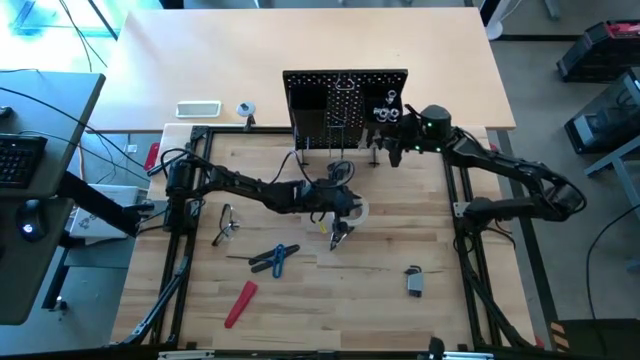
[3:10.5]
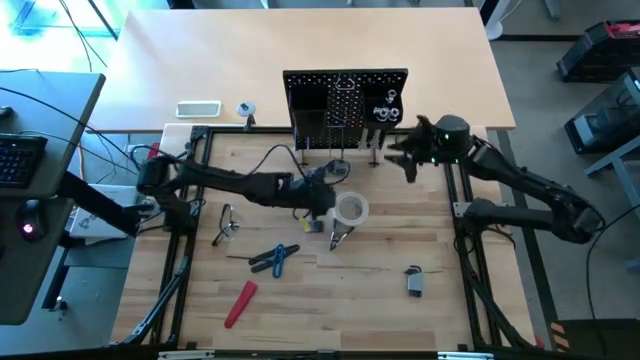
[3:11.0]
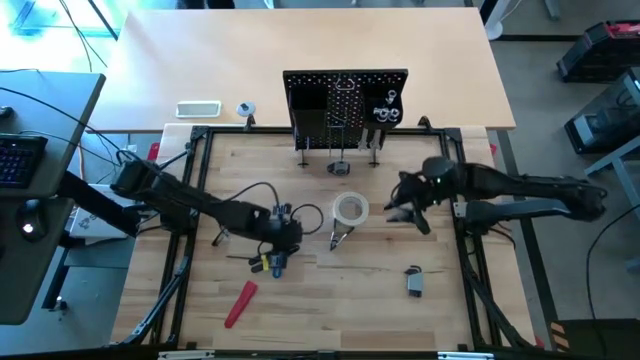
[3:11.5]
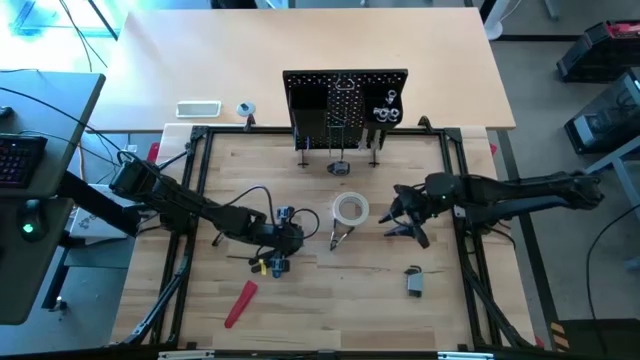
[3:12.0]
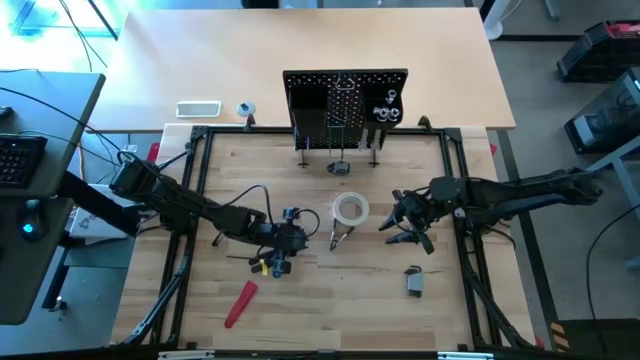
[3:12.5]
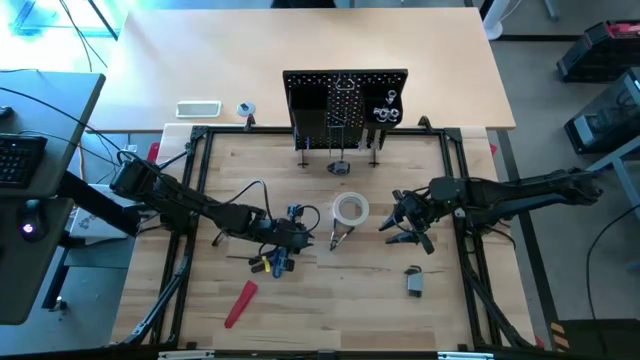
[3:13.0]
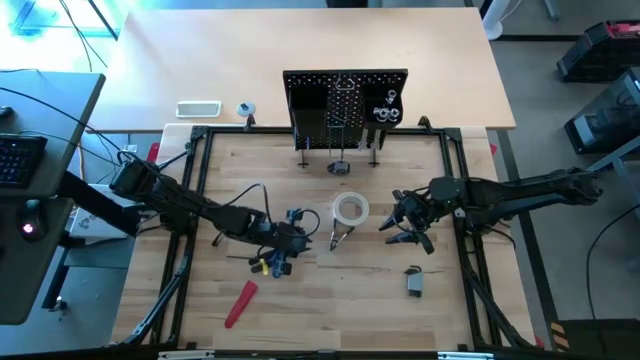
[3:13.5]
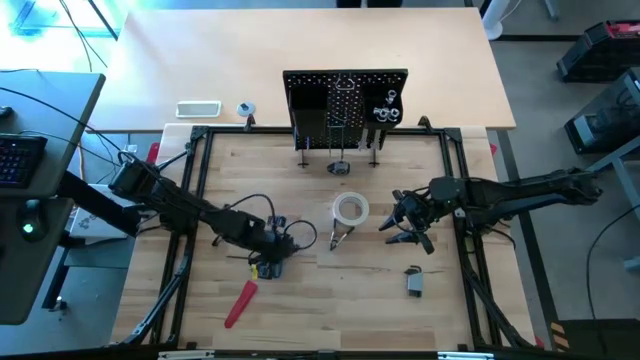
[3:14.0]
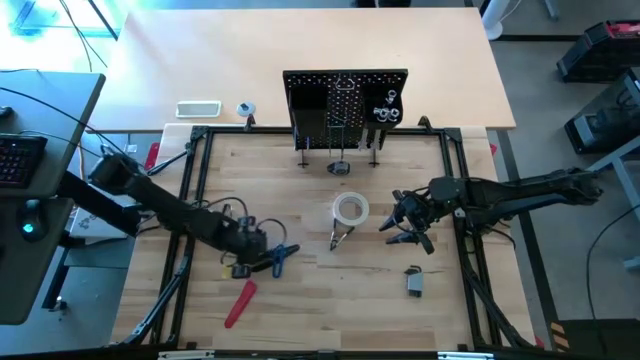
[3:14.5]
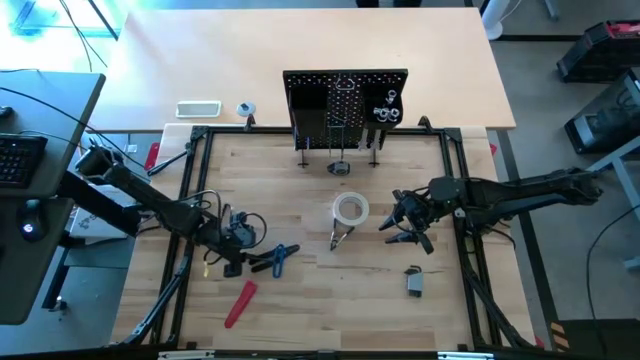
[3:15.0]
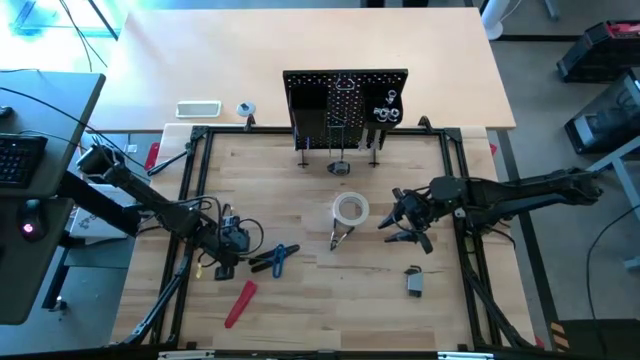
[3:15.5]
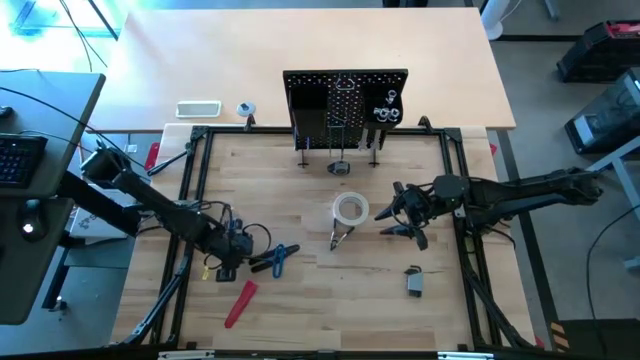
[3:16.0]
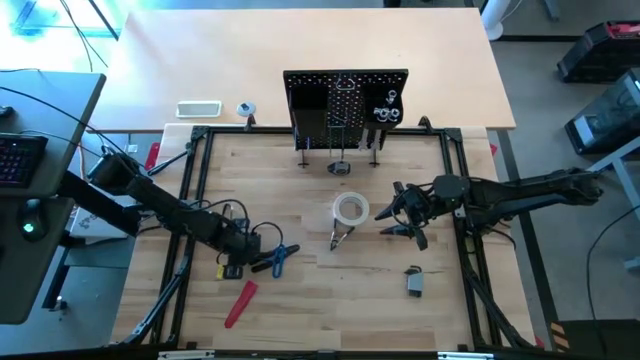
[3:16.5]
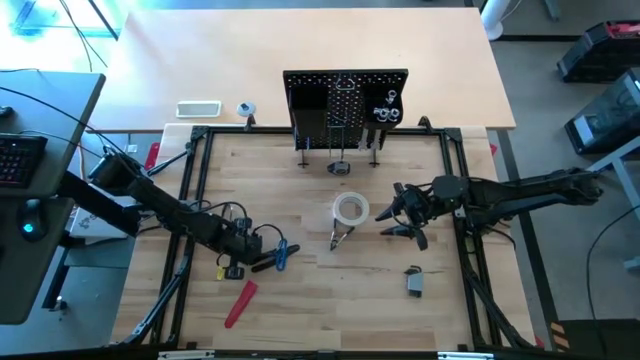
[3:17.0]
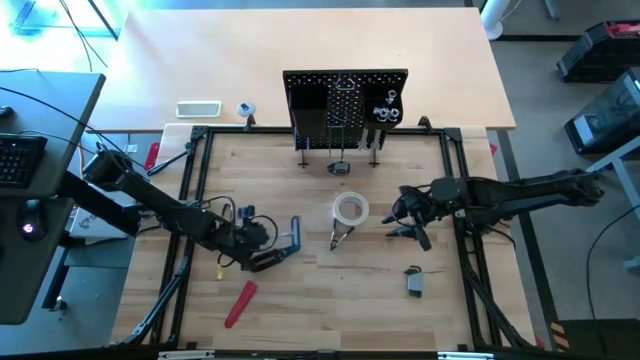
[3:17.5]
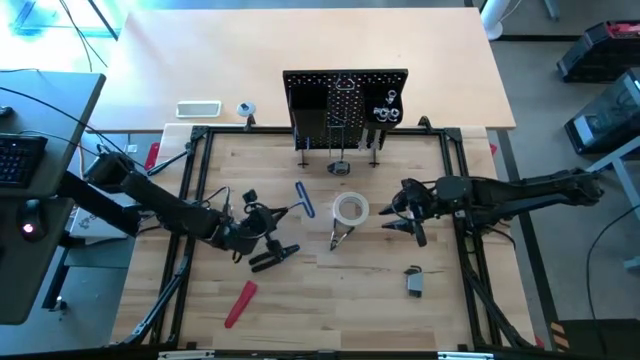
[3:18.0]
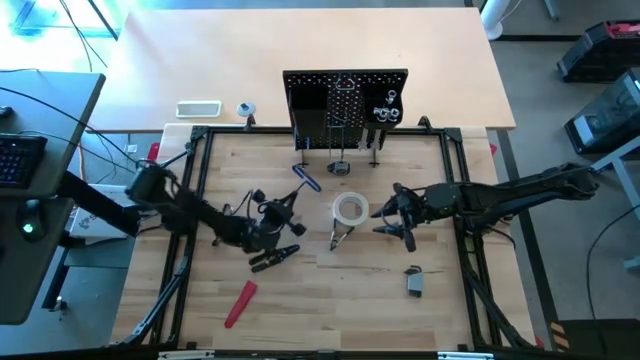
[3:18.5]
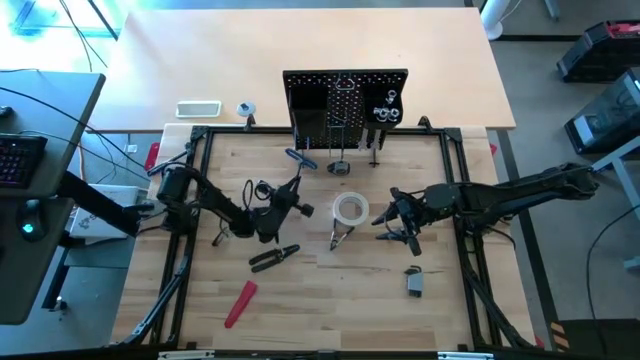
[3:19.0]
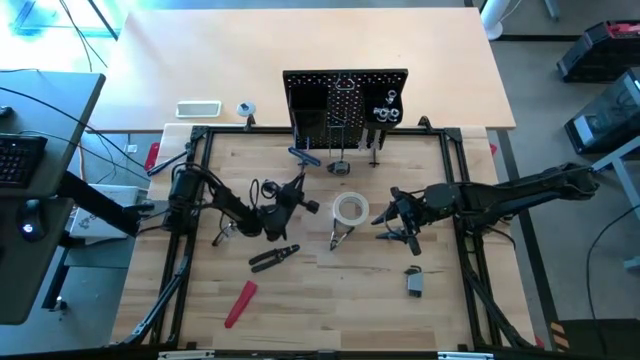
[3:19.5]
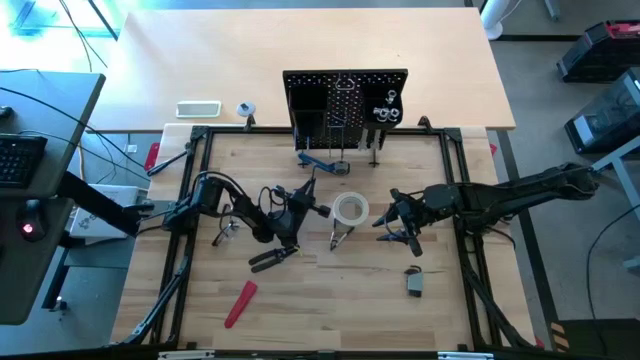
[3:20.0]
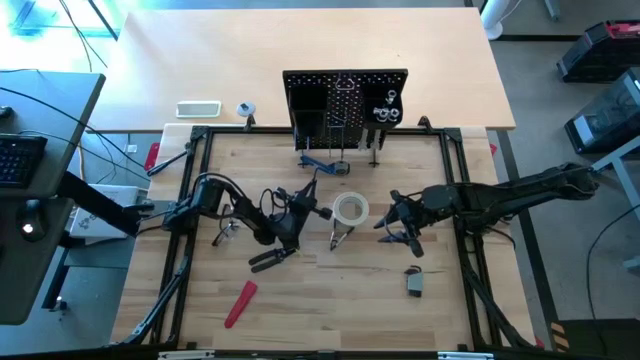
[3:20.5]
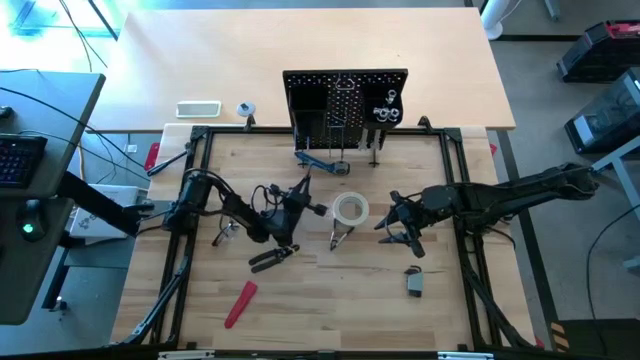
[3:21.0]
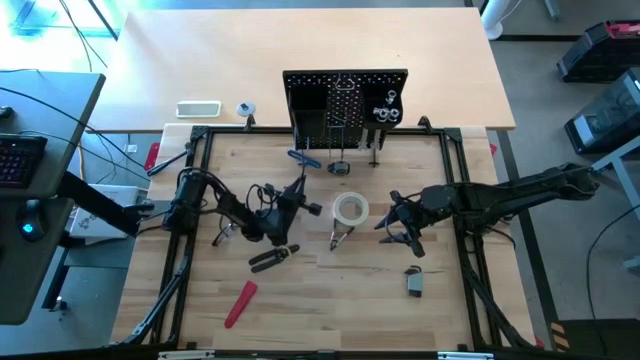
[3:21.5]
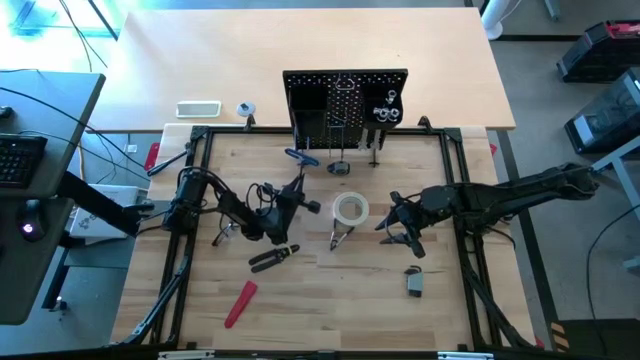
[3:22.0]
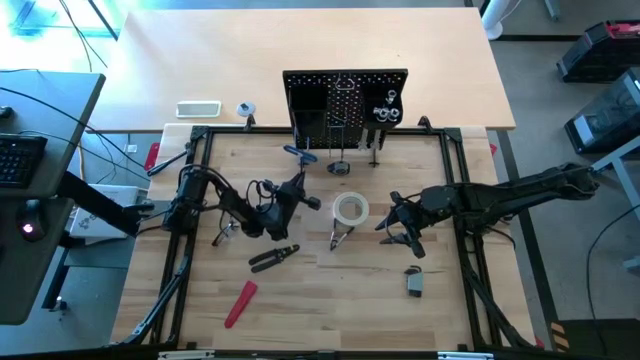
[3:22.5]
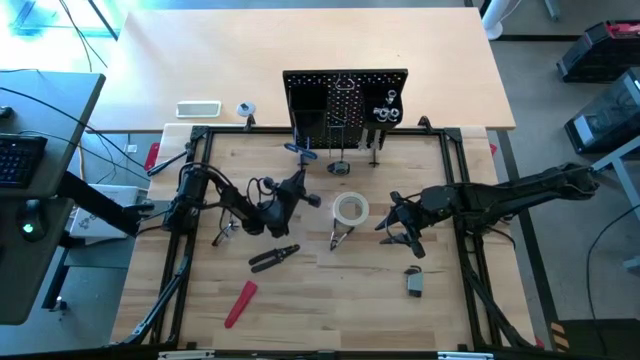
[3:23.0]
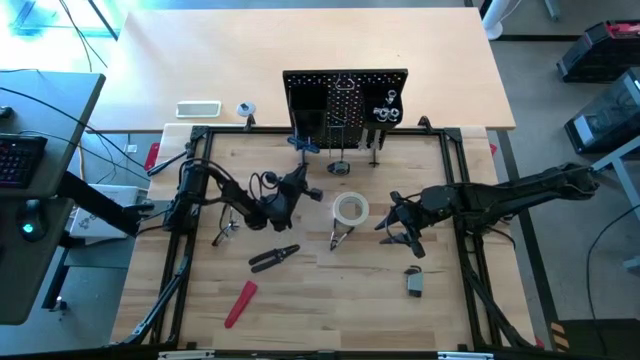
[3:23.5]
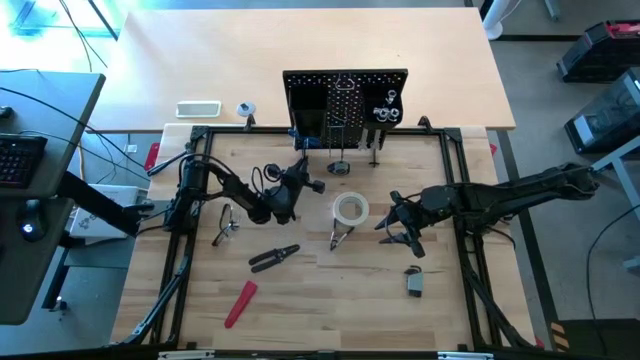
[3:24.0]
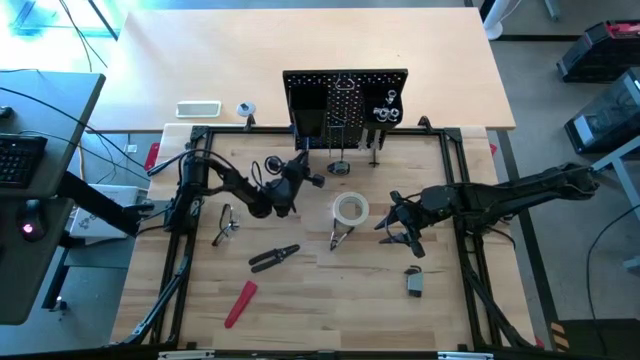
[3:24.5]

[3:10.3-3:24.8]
Task: Hang tools onto peg board
Hang the blue pick tool on the peg board

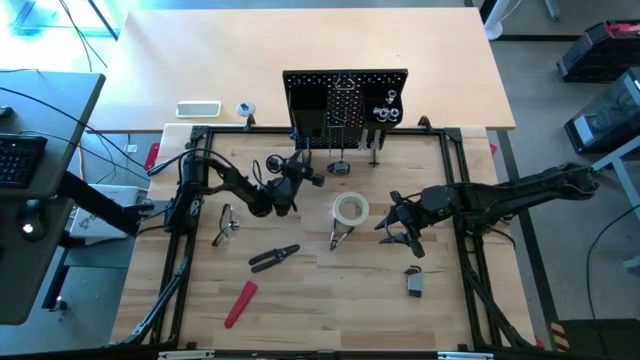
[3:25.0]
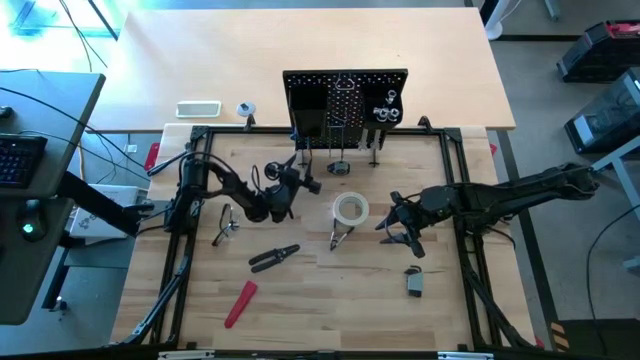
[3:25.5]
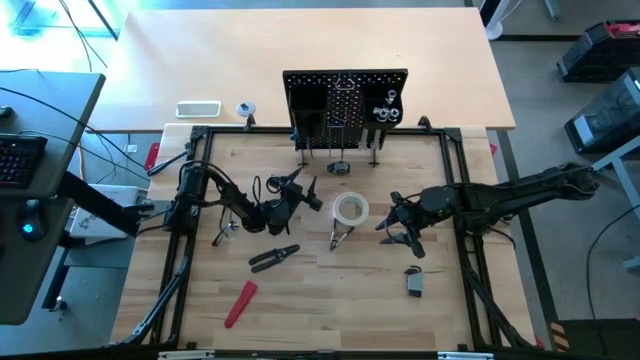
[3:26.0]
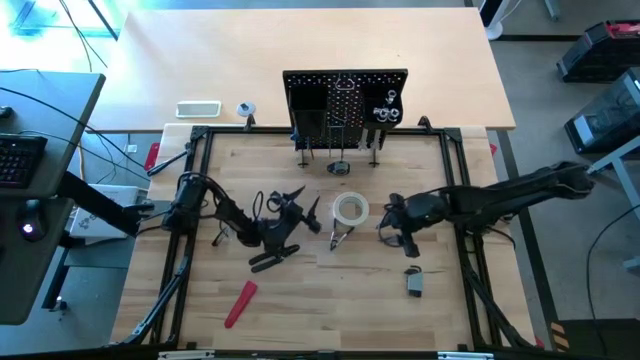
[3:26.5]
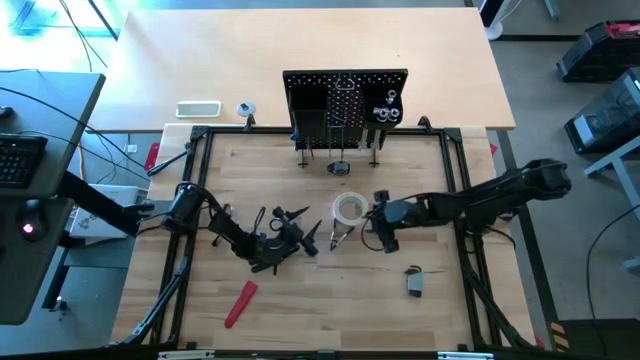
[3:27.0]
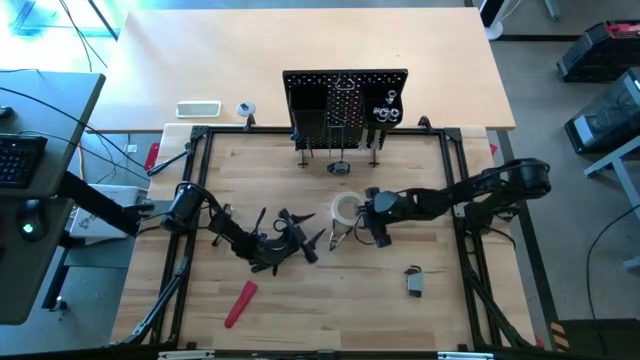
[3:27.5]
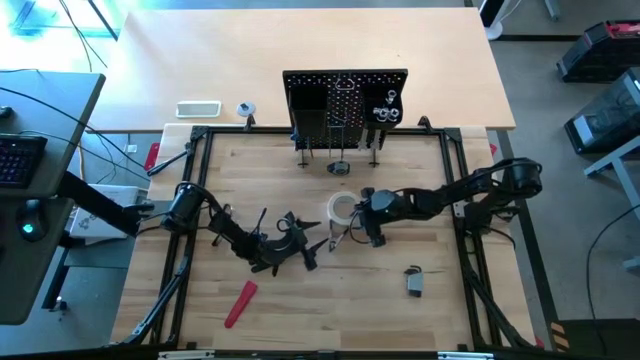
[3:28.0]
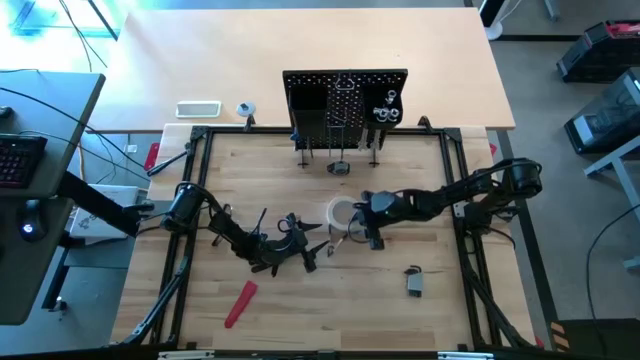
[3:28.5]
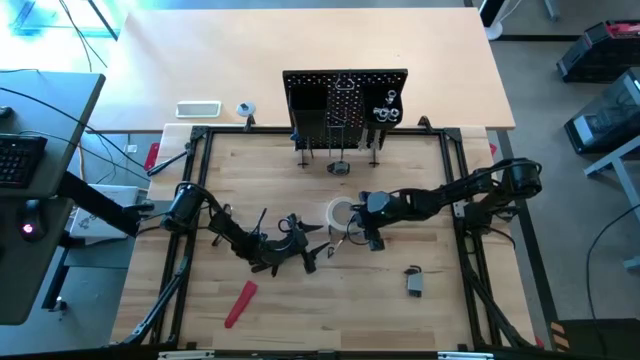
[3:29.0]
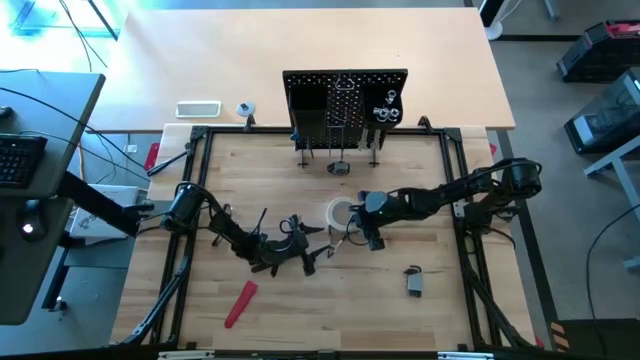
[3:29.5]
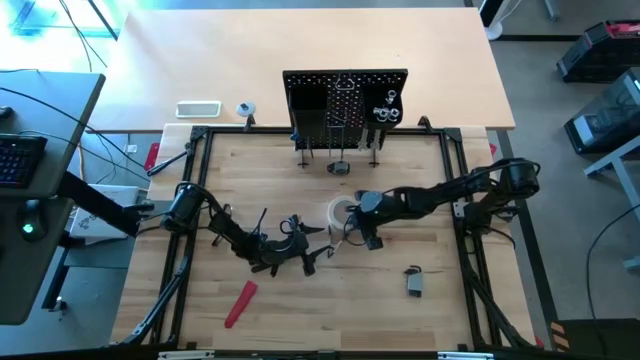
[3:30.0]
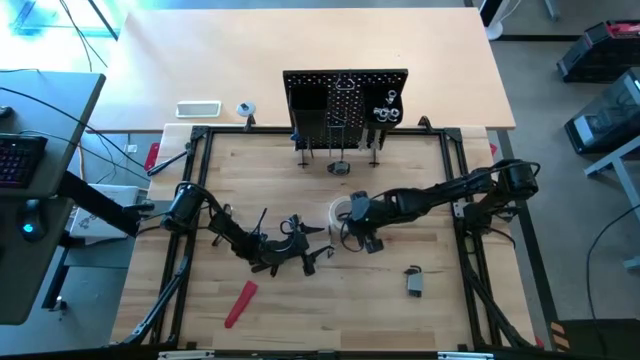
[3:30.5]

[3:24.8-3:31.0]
Hang the white masking tape on the peg board

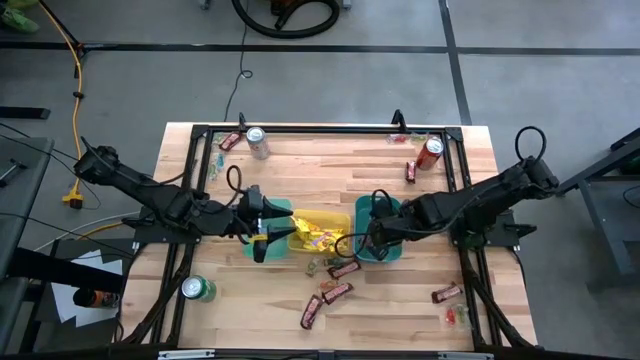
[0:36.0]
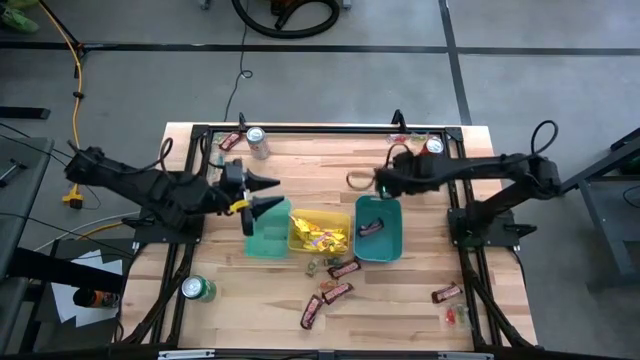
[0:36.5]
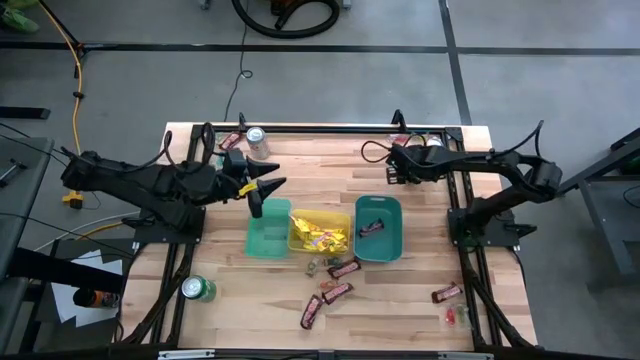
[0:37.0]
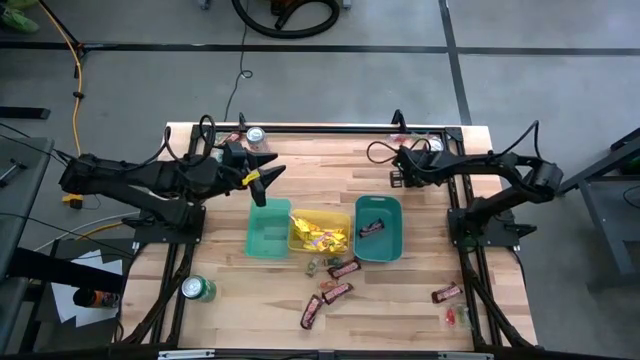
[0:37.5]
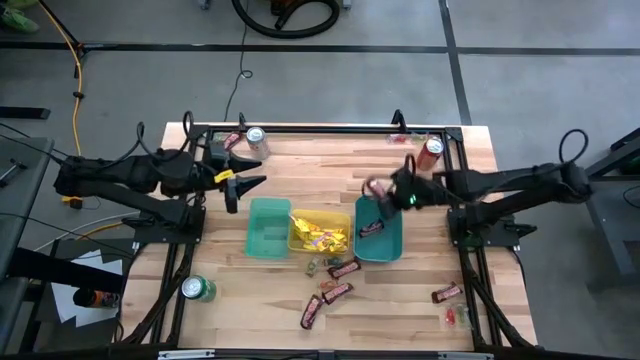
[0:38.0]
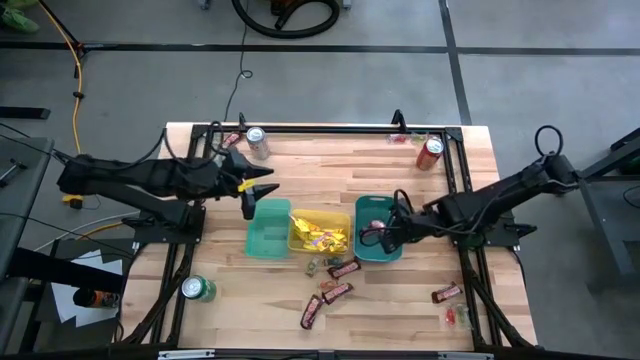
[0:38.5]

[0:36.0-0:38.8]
Task: Sort candy
Put the brown chocolate bar into the blue bin
